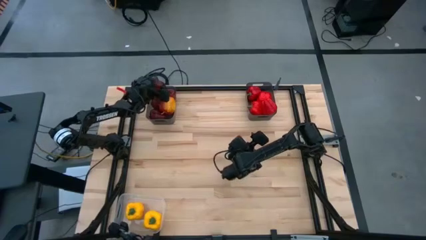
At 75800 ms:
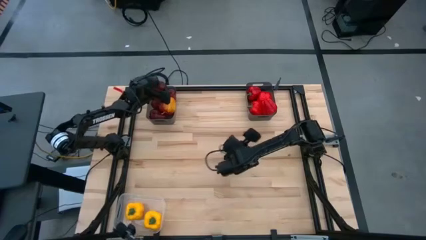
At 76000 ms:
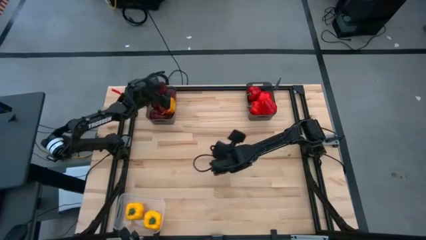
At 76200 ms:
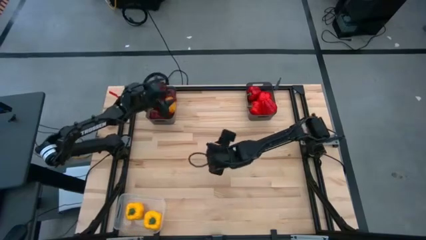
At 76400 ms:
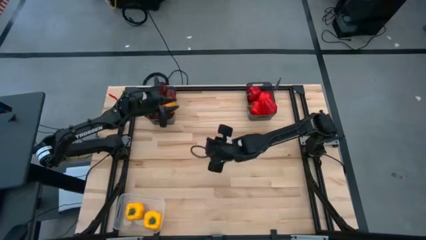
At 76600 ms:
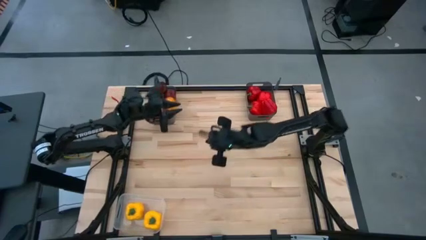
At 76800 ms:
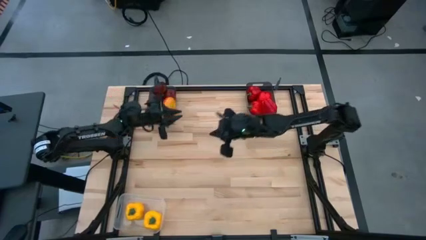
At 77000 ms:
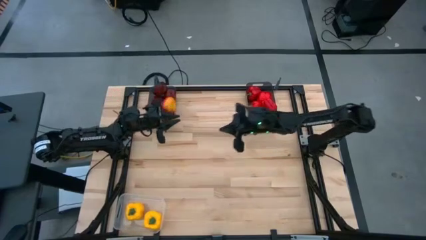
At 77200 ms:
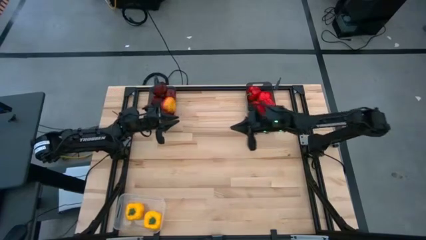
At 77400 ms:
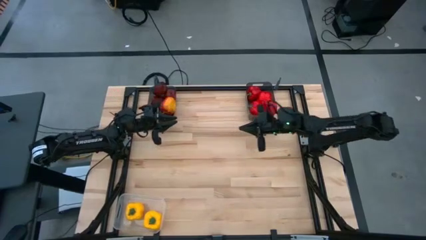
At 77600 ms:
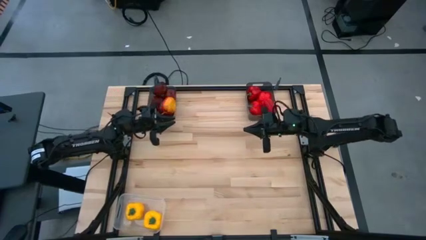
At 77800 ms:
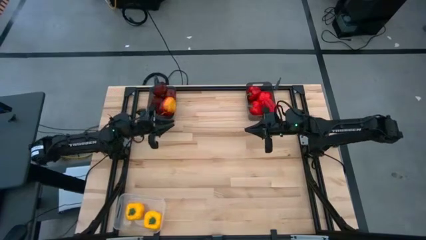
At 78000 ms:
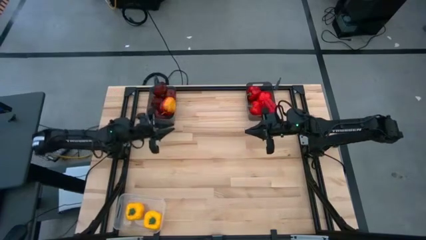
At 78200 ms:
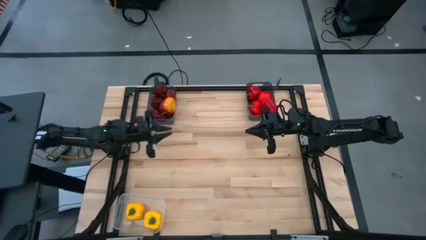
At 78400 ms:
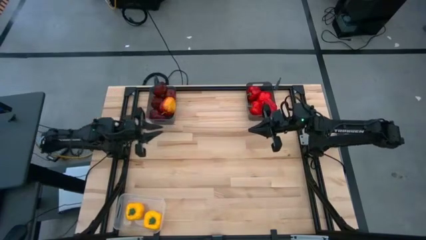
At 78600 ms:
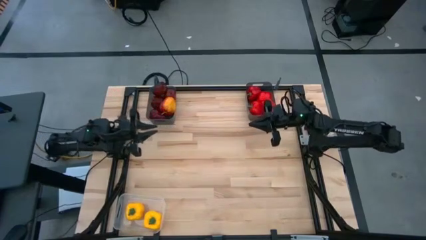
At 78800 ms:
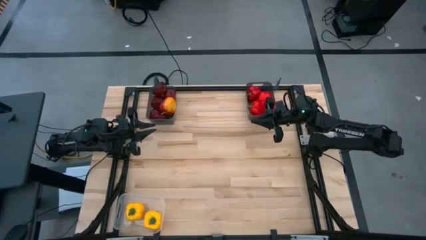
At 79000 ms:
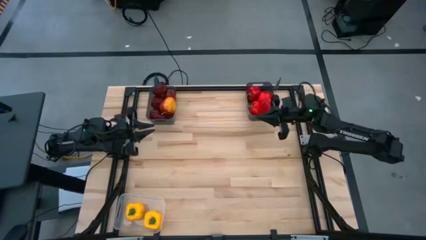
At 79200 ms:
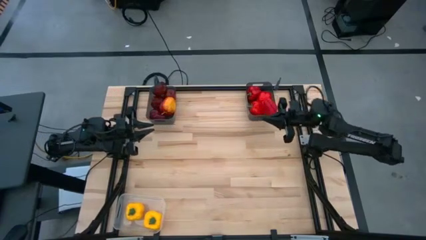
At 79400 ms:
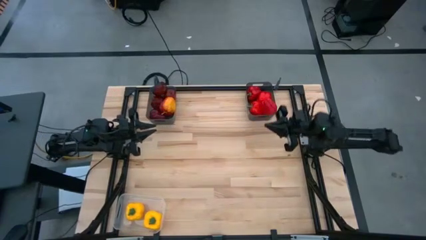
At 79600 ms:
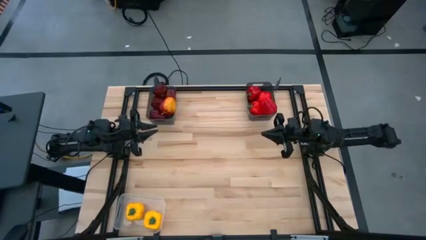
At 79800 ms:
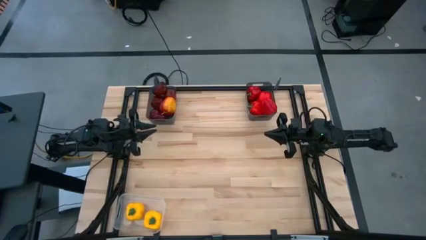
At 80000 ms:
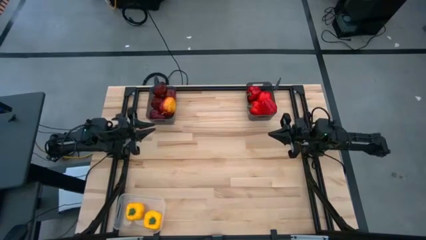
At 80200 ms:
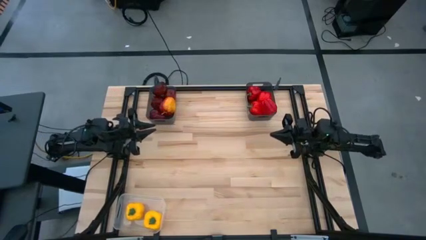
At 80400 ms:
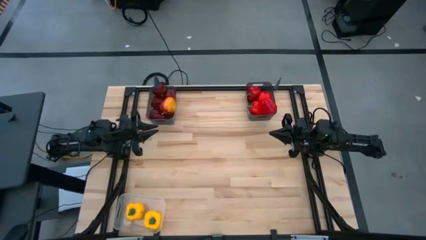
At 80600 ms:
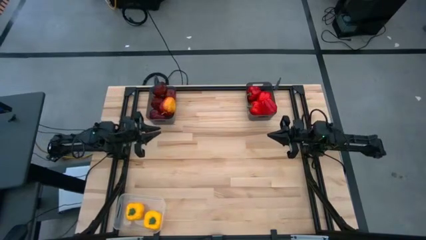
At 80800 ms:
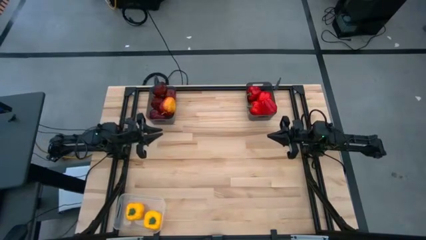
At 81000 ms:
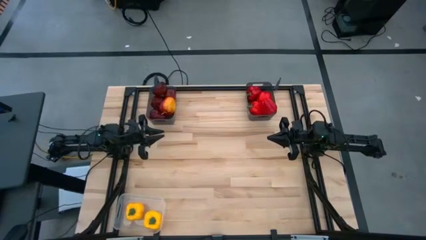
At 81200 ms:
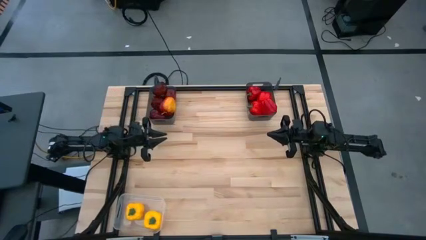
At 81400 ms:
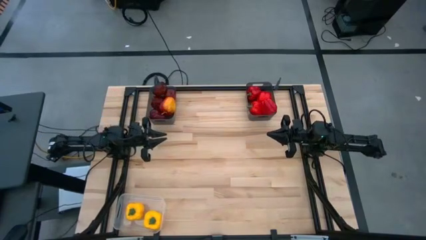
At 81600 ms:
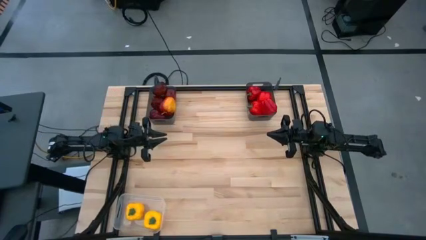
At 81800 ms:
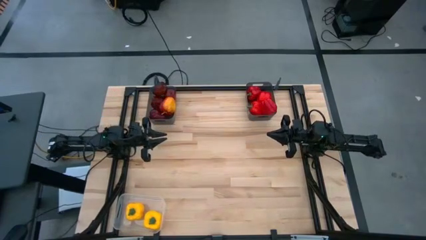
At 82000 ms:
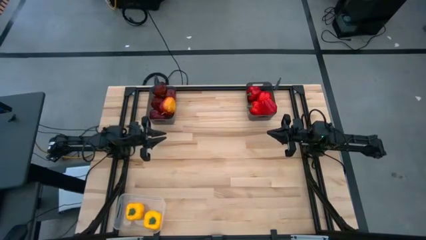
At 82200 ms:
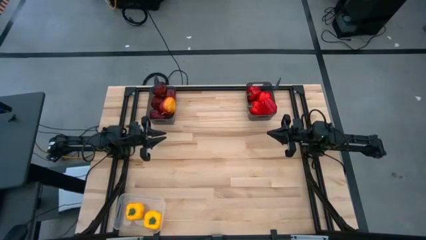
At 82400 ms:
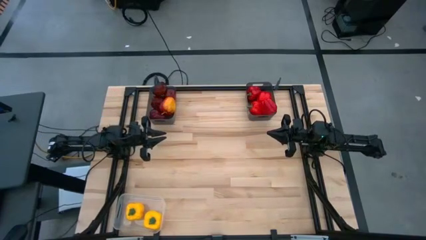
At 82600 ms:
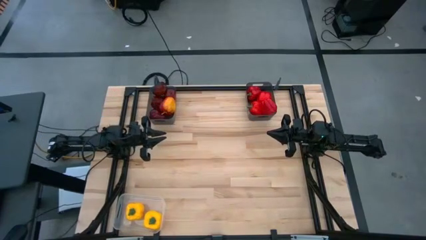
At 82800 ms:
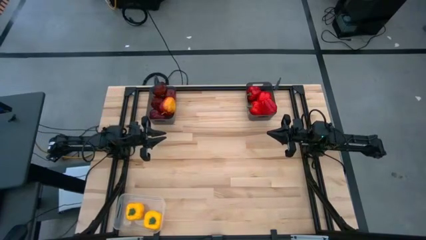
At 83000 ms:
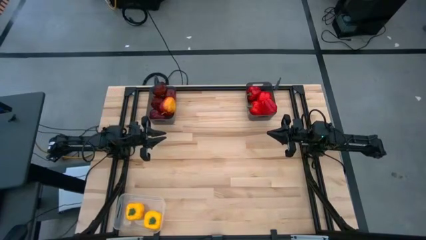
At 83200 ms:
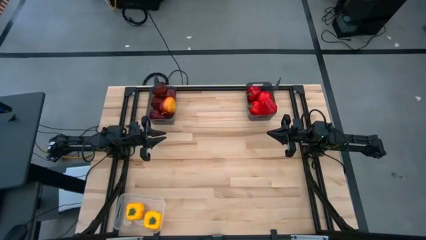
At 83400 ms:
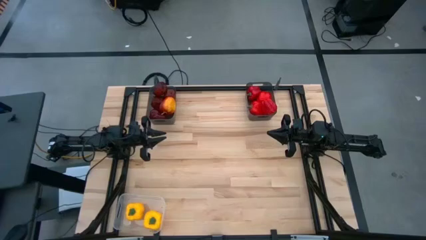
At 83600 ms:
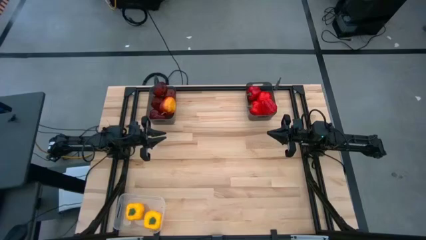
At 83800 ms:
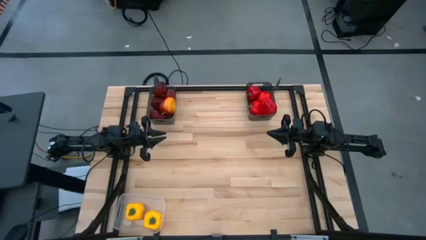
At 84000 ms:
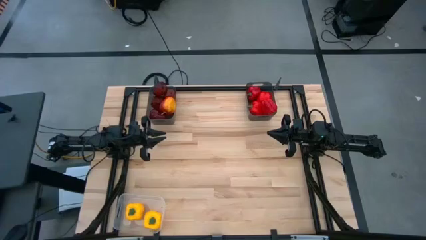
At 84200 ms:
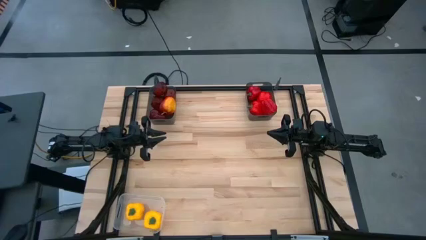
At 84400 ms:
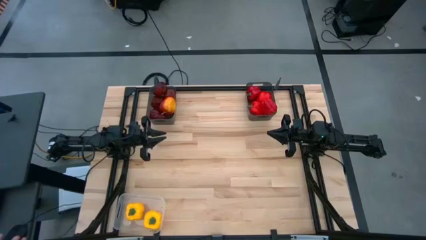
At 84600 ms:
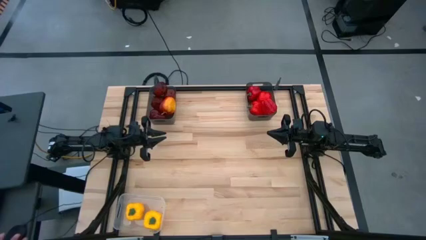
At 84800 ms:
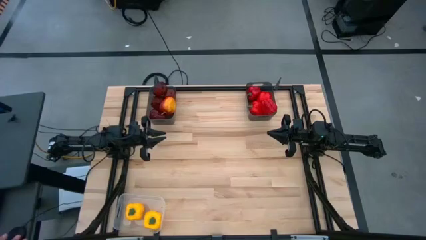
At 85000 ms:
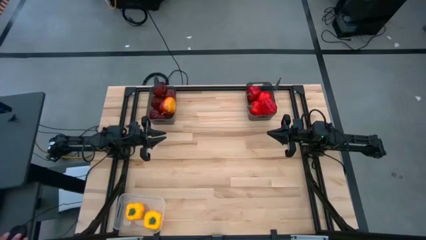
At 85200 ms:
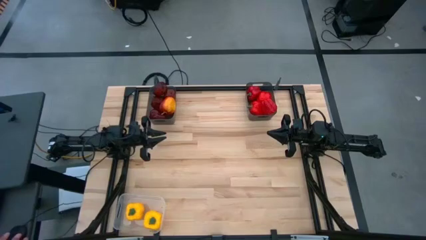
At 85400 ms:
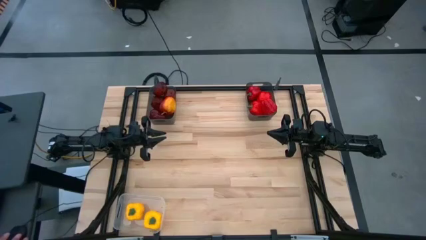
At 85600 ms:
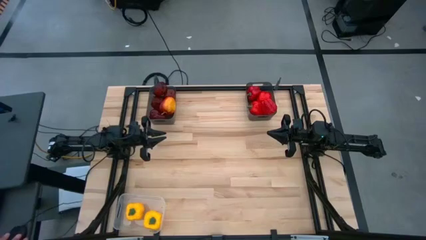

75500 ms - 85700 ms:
Task: Sort produce into baskets
Return to Home Position

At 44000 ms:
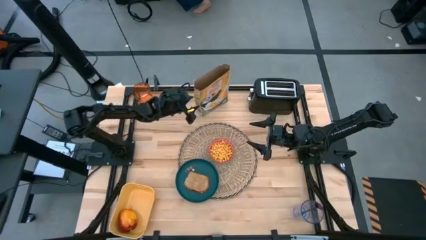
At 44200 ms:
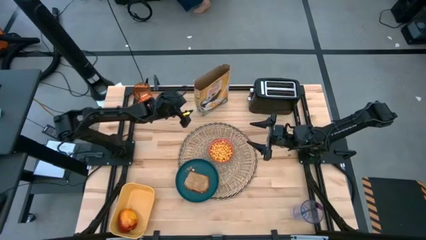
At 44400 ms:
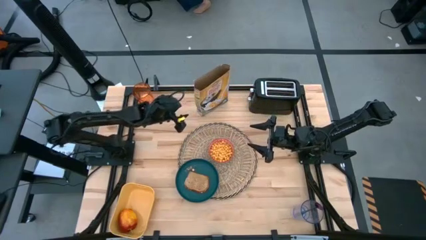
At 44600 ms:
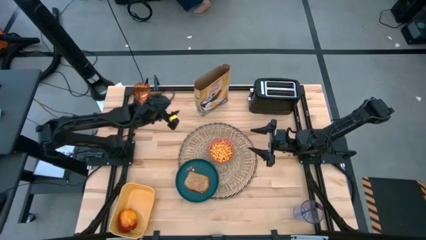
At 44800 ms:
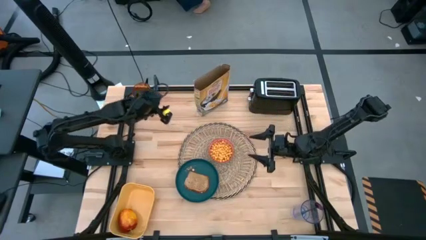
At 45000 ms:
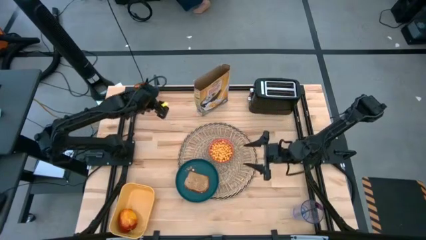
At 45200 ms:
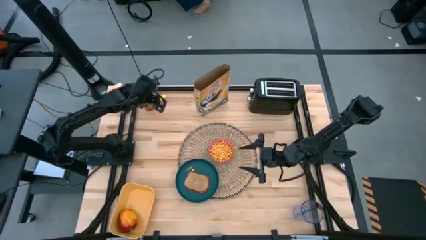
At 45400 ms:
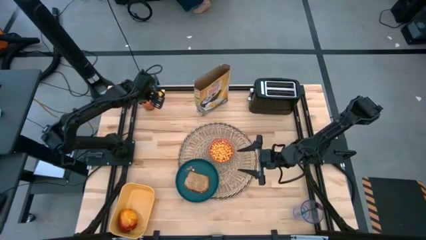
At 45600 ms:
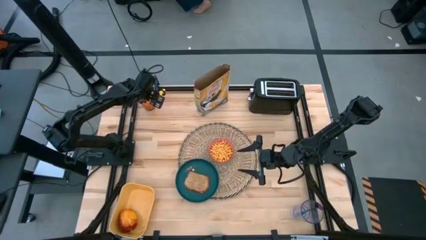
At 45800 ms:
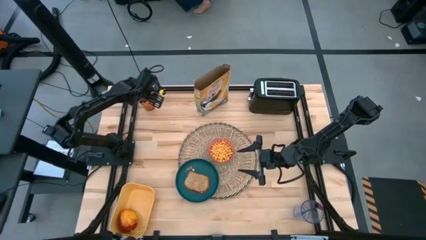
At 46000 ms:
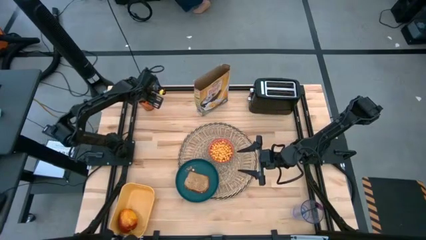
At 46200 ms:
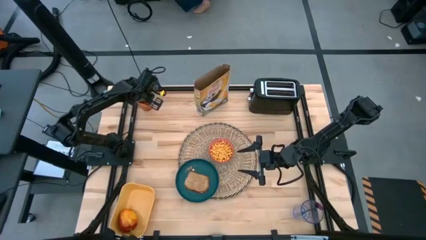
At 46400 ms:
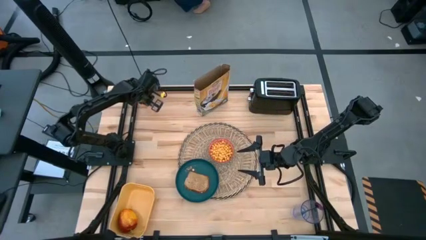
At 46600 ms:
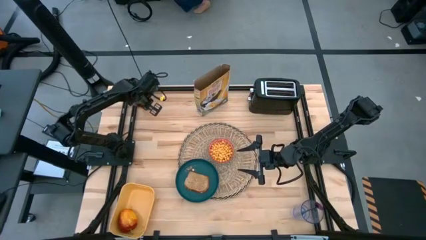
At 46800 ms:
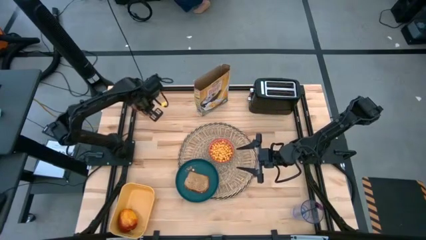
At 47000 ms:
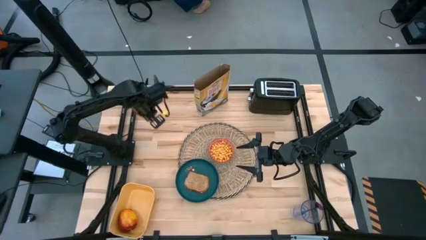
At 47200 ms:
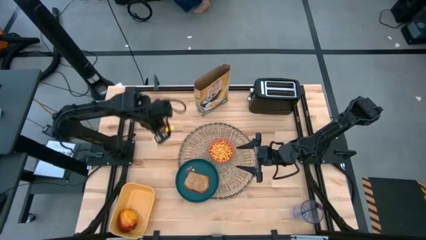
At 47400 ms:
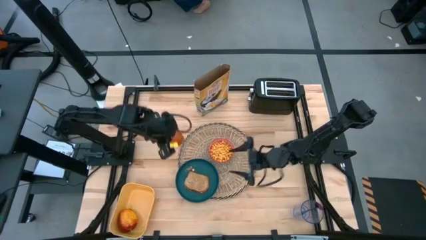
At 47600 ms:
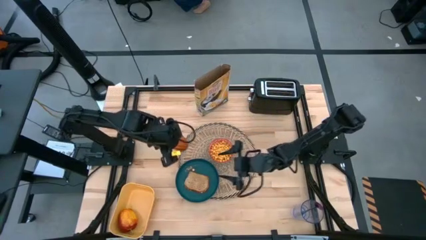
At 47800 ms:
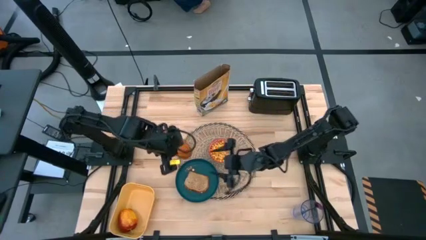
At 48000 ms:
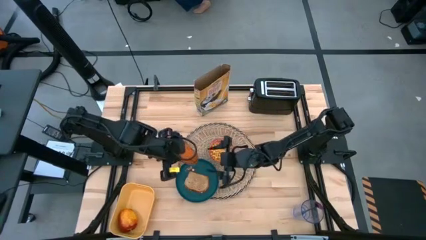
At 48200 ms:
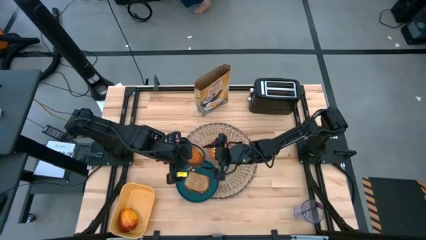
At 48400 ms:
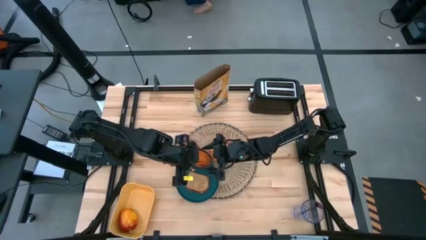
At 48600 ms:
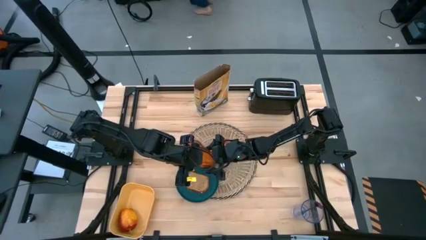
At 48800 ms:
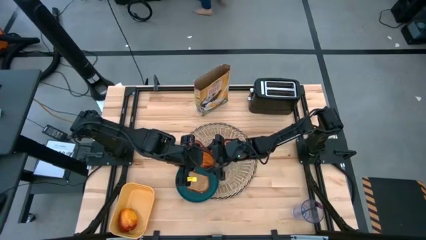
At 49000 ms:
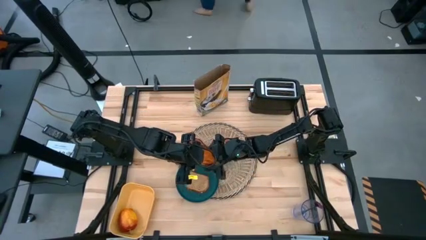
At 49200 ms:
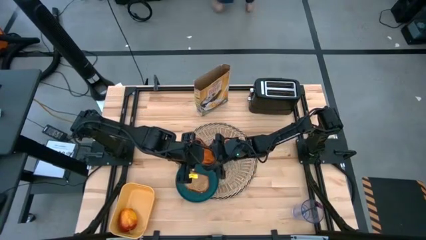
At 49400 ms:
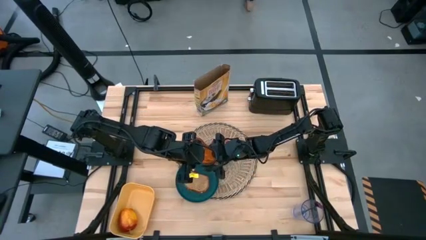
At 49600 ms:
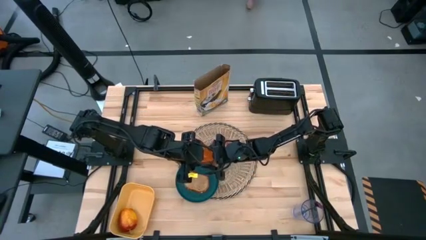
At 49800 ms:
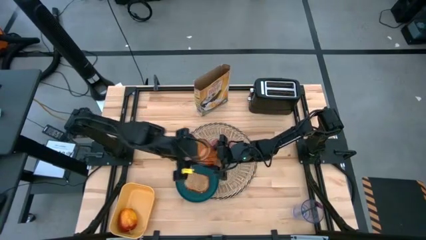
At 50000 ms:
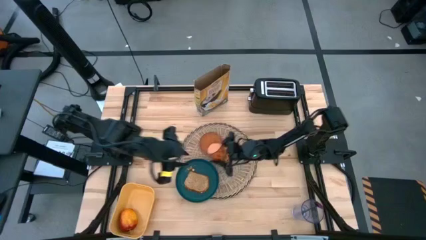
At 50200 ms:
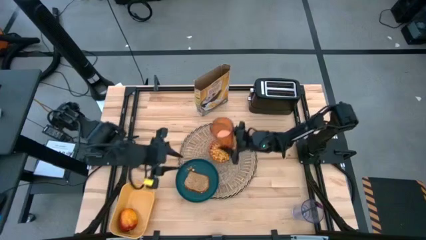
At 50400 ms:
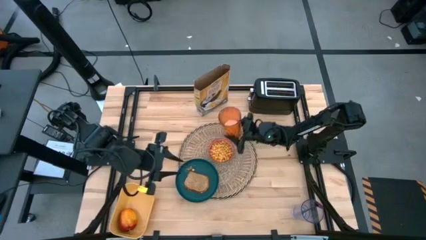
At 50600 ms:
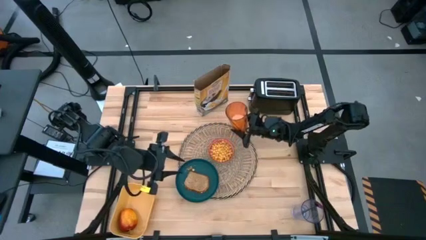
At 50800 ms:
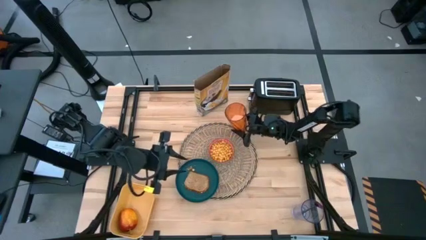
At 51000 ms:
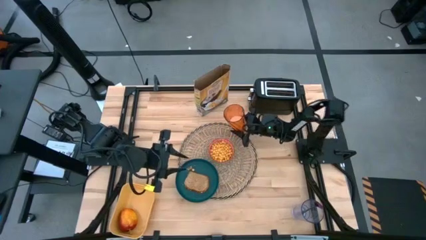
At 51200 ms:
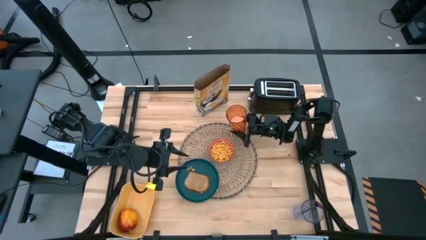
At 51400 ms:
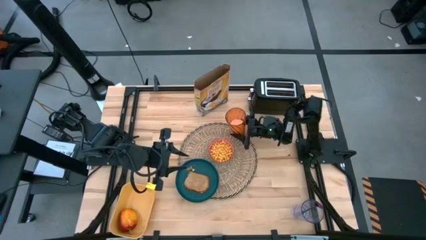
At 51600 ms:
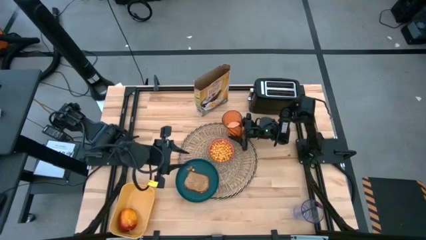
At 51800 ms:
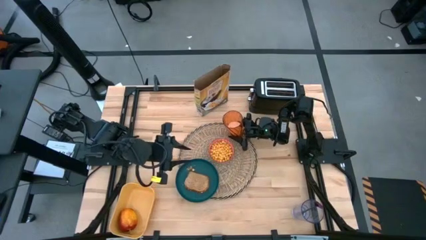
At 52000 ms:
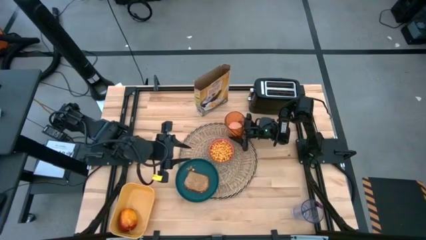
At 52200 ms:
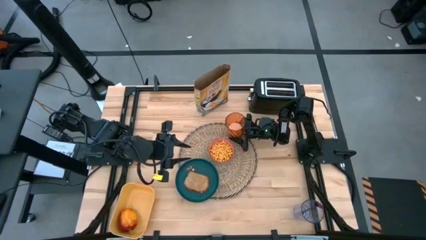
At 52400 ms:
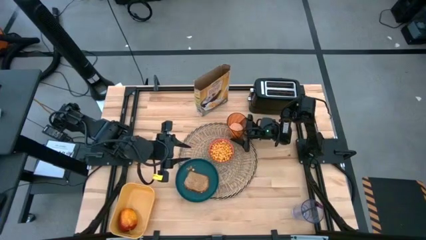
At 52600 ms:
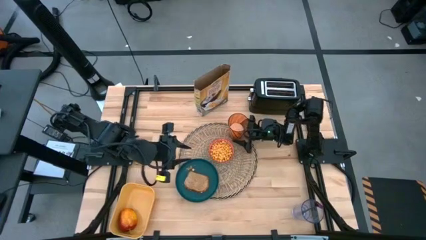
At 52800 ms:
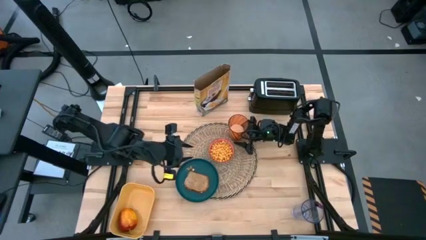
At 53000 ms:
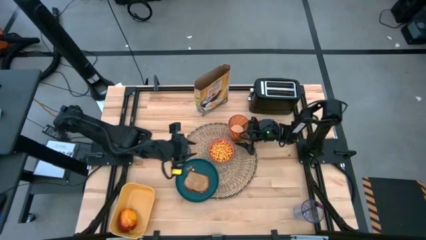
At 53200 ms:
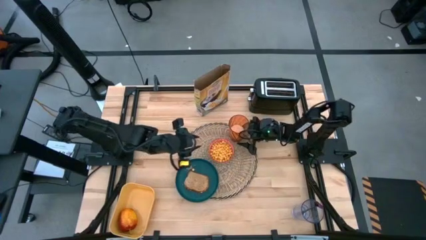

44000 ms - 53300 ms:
Task: Arrange a breakfast setting
Put the orange cup on the brown table mat
